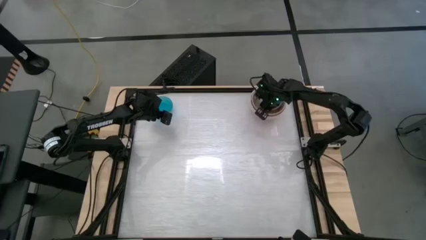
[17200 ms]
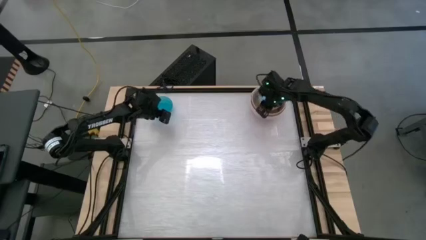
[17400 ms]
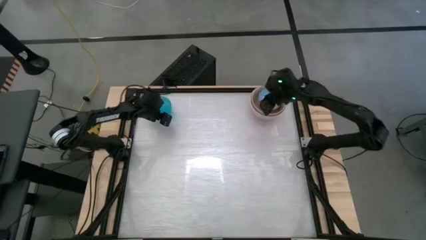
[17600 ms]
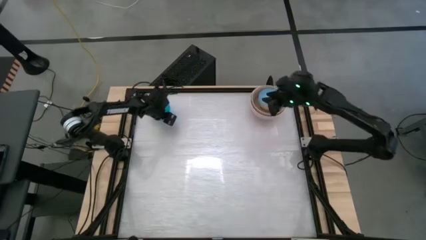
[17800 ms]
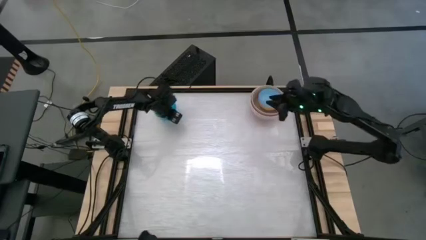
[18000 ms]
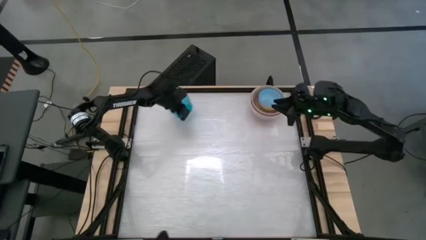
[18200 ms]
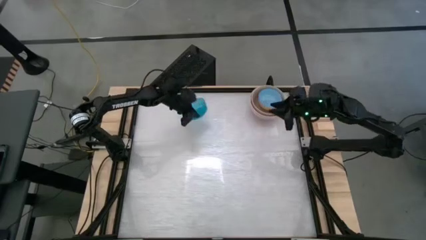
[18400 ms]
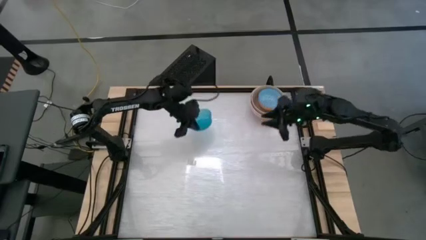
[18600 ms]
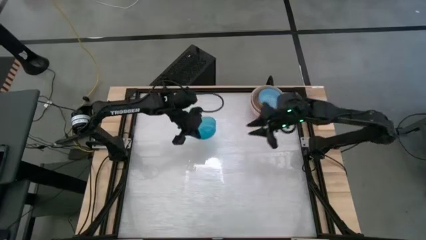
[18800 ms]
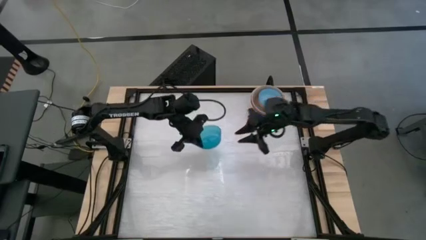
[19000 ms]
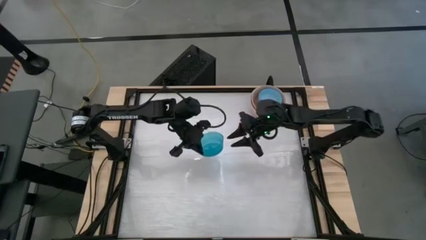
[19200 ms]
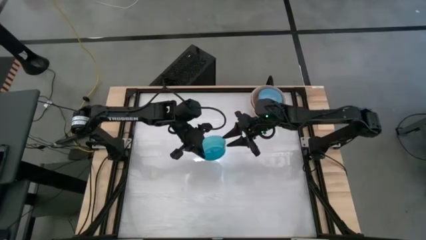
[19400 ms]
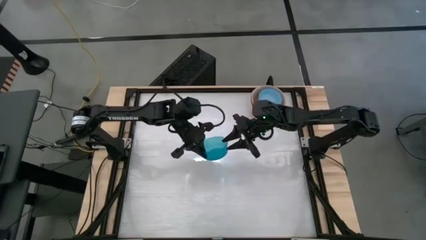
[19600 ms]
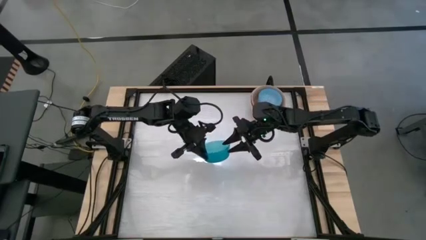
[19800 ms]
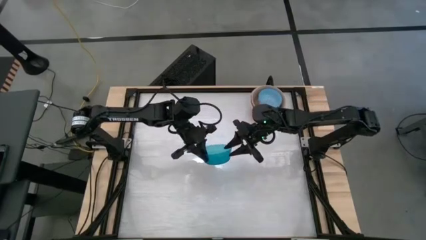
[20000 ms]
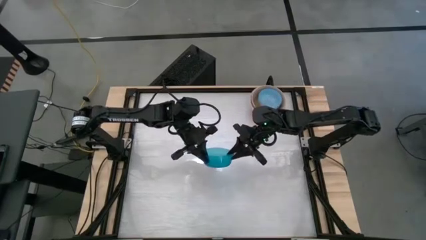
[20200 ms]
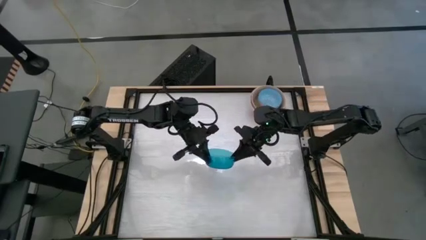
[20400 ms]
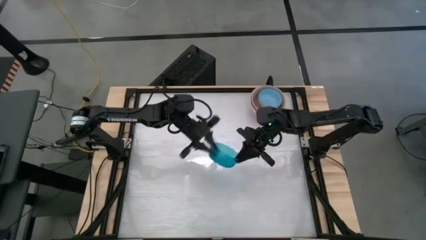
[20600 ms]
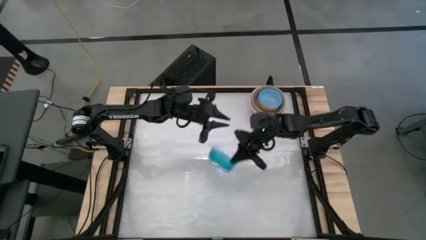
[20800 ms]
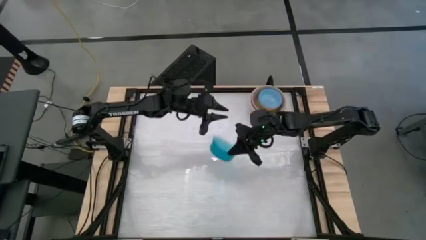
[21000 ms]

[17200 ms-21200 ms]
Stack the transparent blue bowl on top of the blue bowl

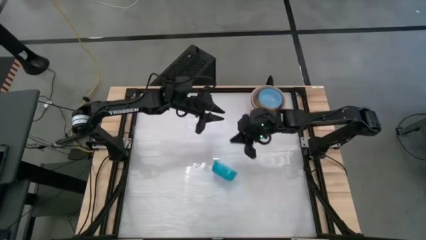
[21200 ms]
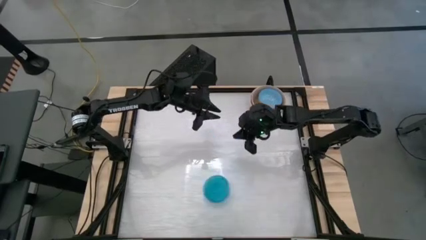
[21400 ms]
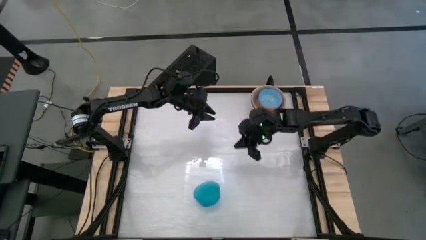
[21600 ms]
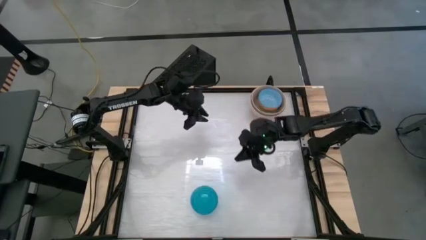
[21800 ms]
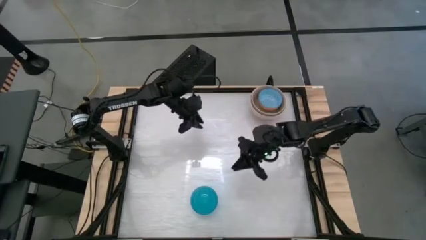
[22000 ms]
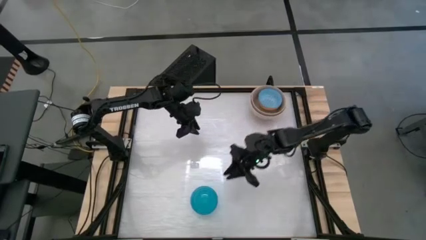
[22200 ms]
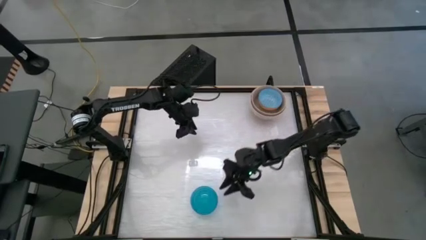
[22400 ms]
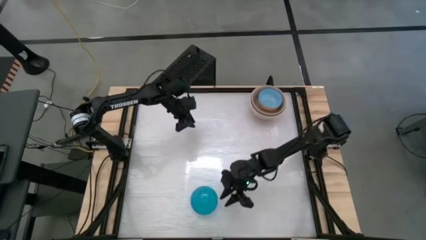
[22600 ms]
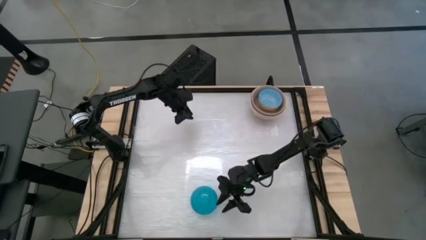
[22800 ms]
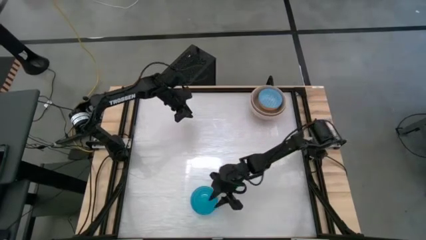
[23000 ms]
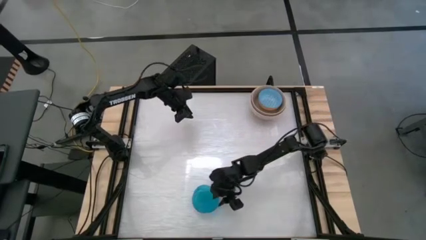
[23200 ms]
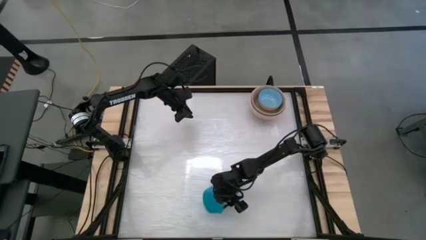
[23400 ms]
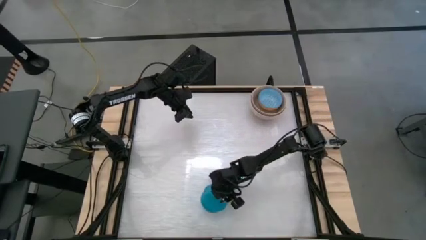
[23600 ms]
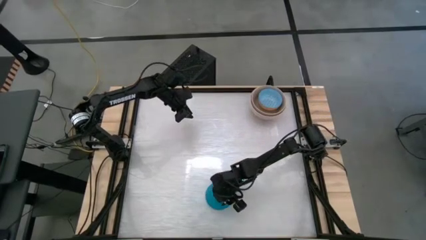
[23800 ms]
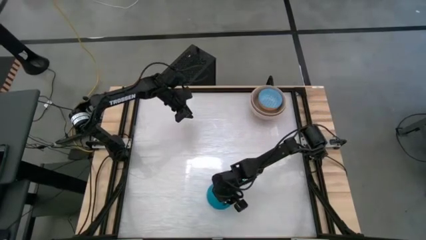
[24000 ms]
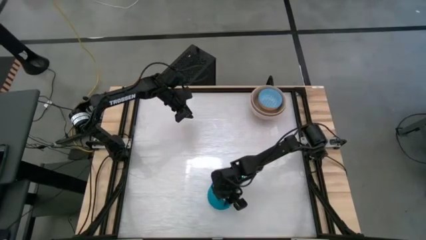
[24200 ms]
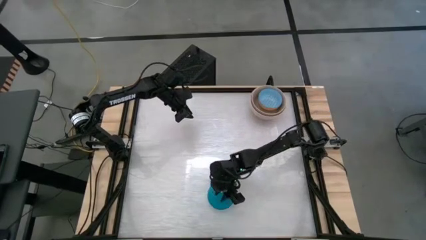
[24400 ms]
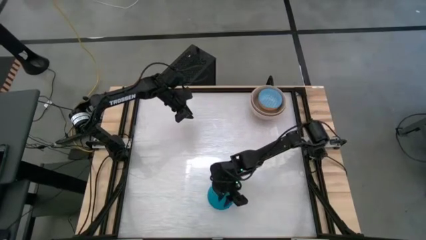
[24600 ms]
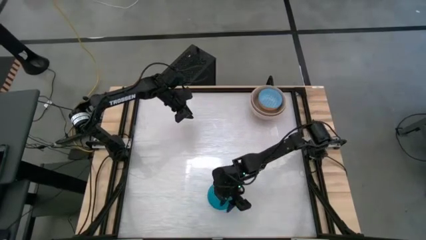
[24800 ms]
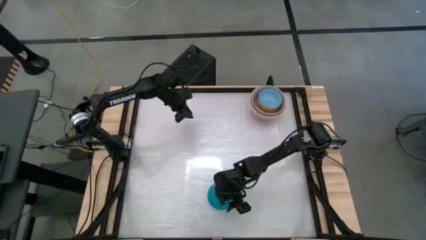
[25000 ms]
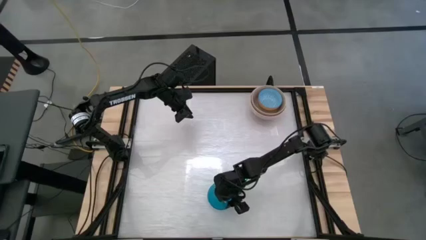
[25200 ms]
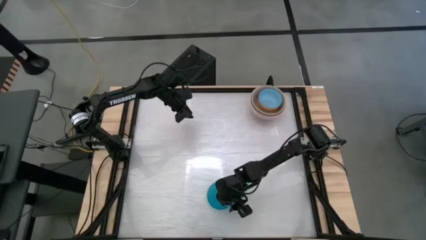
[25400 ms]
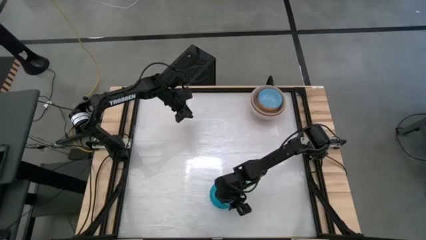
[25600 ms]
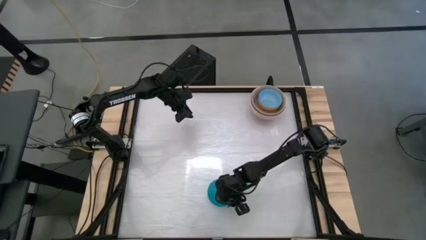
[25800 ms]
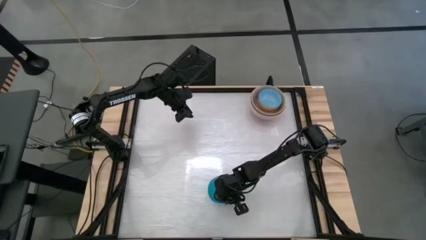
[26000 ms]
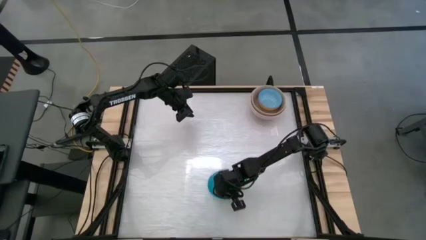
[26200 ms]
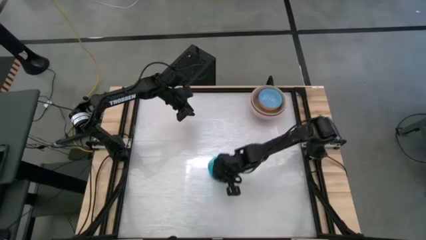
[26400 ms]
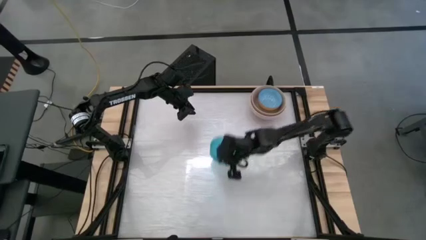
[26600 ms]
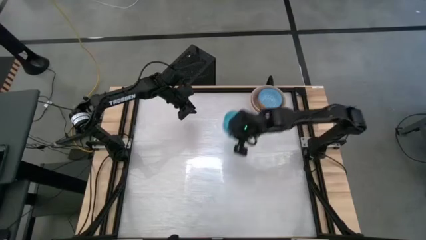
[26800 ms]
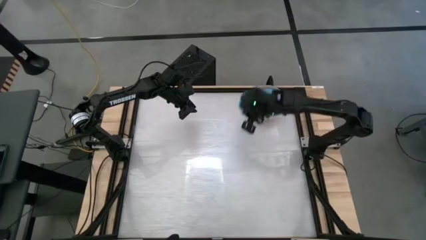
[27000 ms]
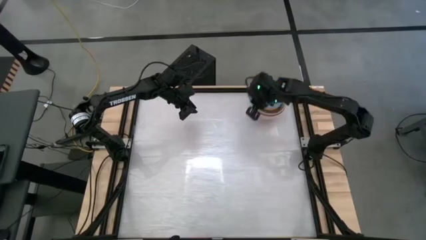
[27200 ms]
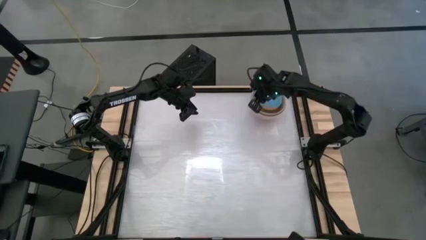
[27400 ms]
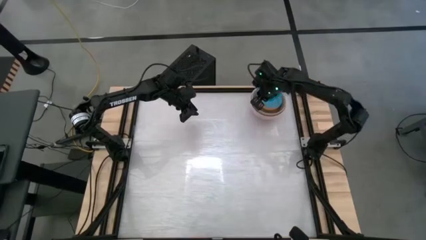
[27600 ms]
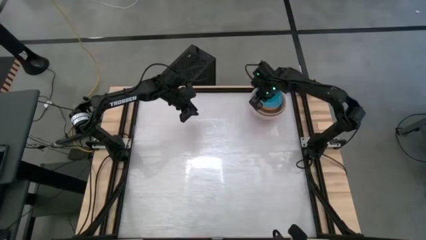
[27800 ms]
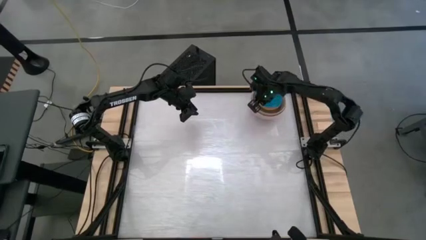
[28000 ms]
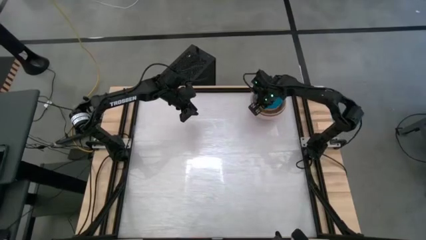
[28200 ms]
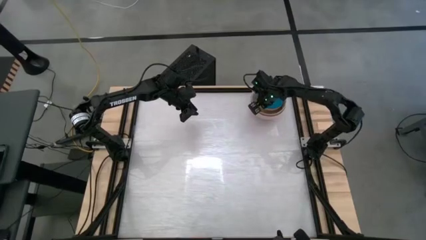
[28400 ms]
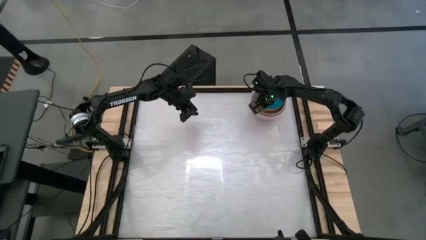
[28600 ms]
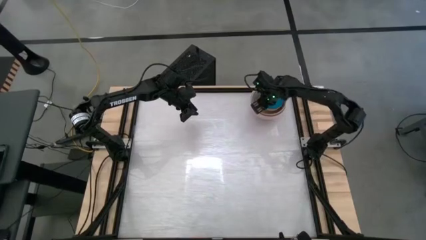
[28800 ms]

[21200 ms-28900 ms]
Stack the transparent blue bowl on top of the blue bowl

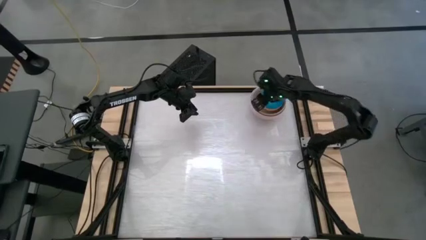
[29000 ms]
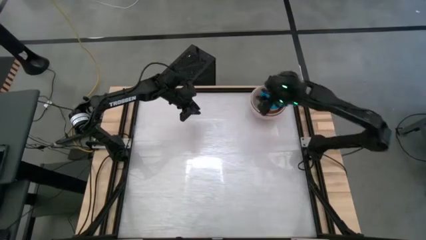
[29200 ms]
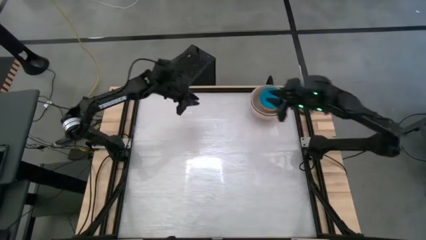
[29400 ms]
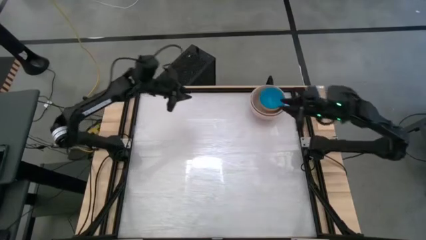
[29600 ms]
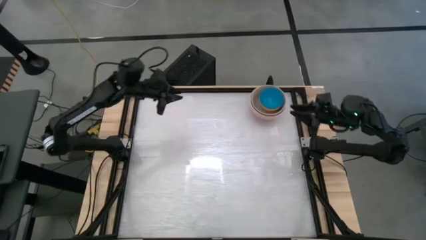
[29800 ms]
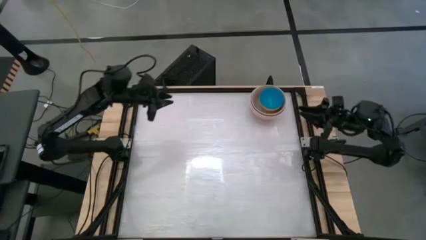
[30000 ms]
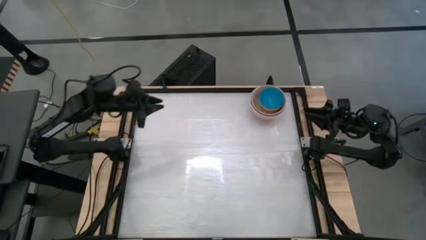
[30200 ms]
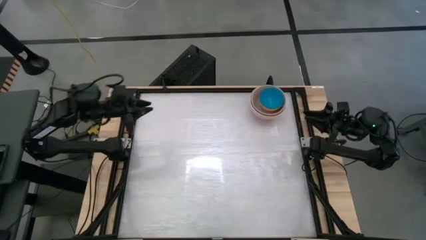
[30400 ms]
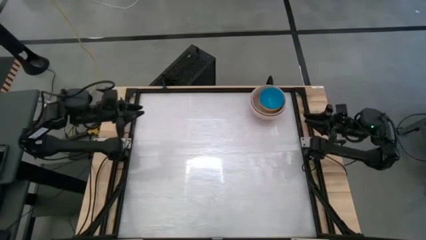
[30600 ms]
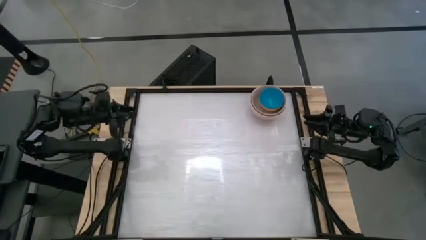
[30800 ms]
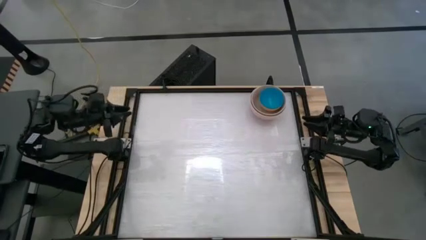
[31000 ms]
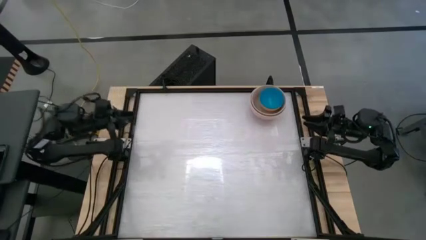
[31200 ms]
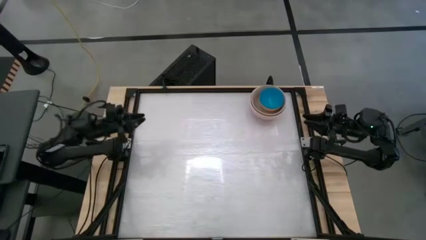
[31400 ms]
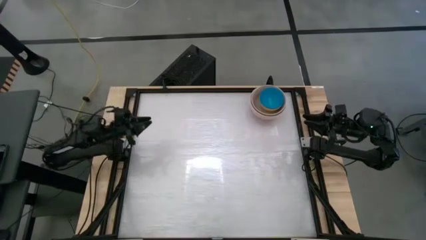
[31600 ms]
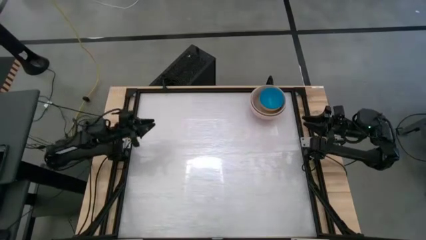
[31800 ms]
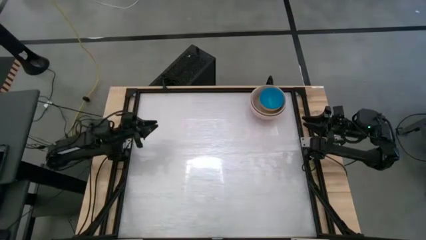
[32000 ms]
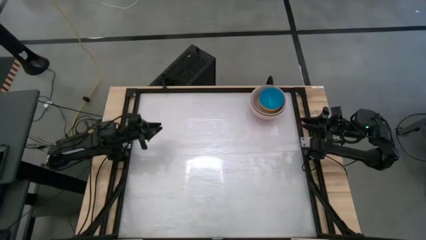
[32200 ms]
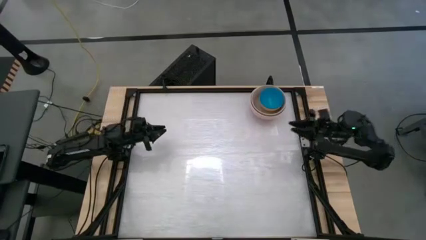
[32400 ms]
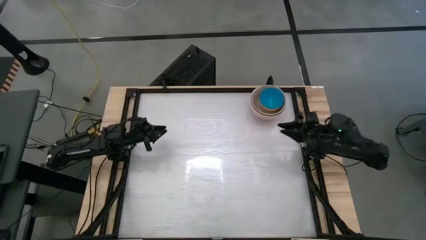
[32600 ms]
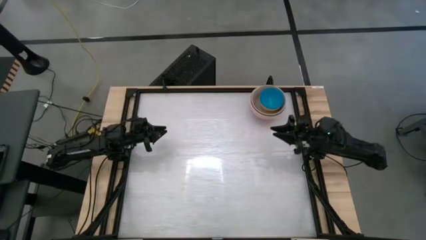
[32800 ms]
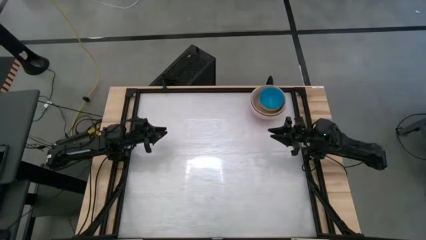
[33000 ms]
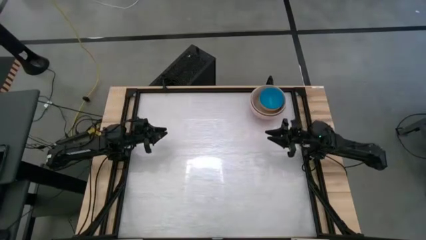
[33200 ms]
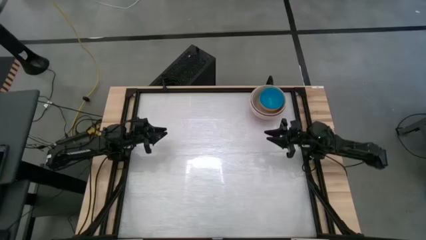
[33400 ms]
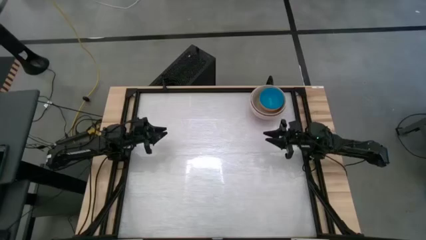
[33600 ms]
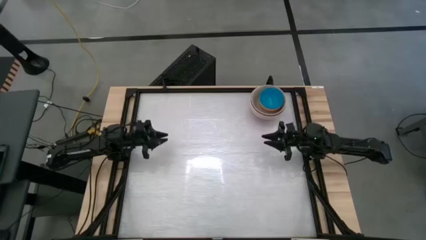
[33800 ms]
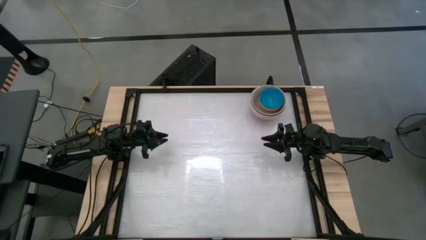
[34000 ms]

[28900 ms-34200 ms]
Return to Home Position
